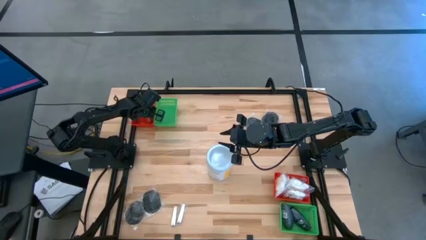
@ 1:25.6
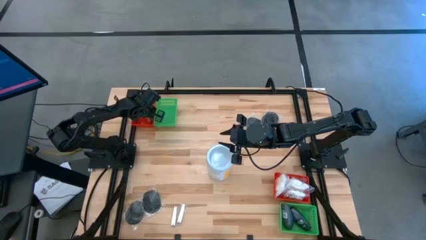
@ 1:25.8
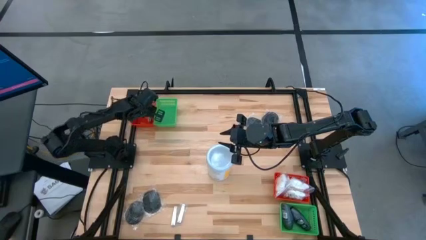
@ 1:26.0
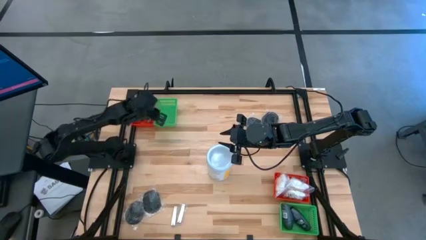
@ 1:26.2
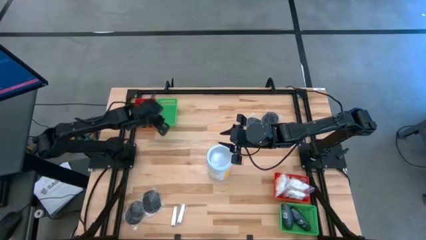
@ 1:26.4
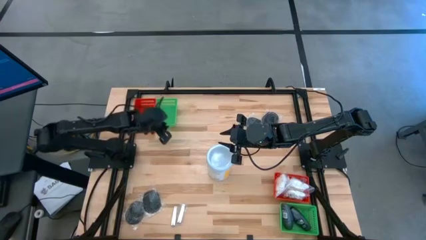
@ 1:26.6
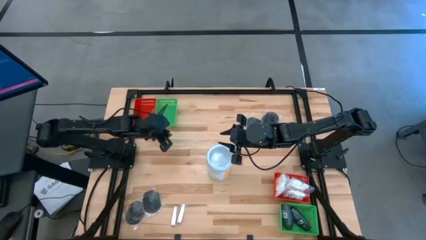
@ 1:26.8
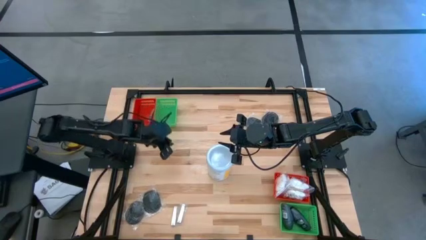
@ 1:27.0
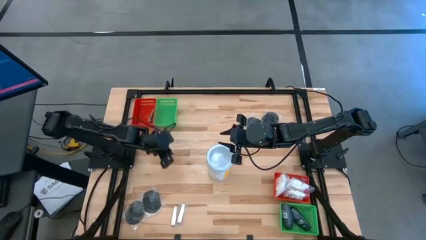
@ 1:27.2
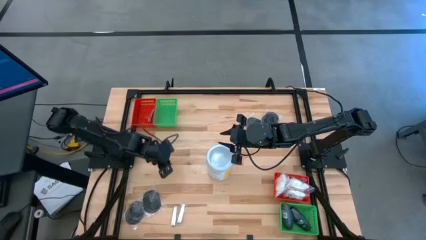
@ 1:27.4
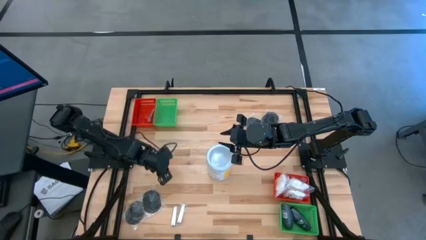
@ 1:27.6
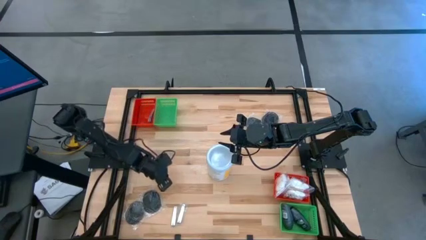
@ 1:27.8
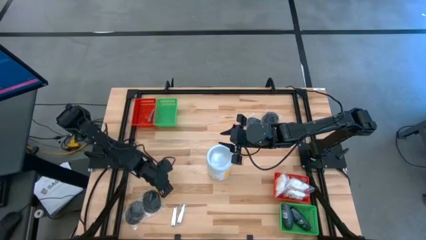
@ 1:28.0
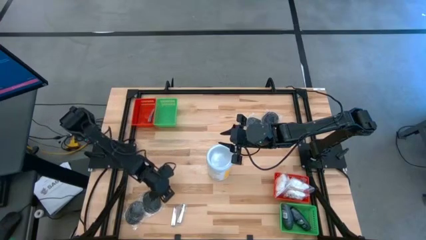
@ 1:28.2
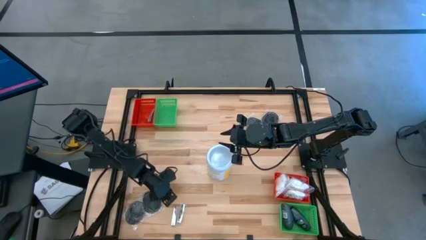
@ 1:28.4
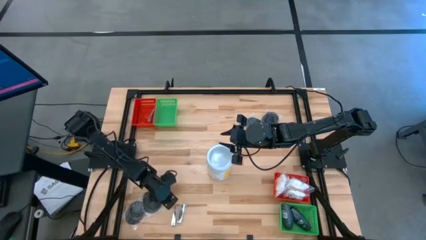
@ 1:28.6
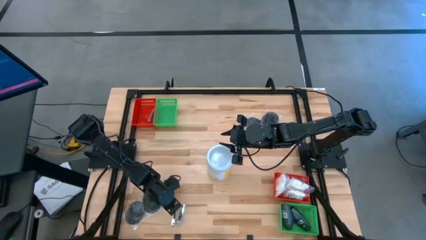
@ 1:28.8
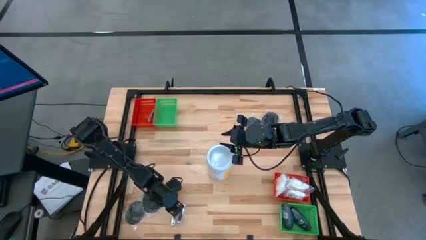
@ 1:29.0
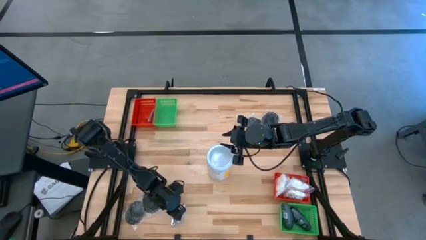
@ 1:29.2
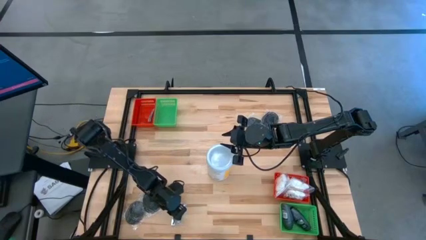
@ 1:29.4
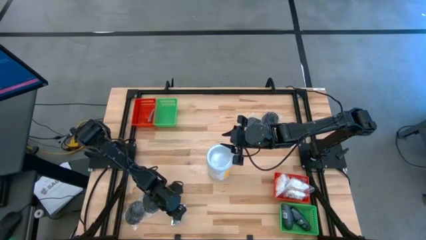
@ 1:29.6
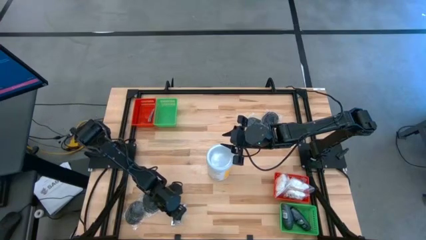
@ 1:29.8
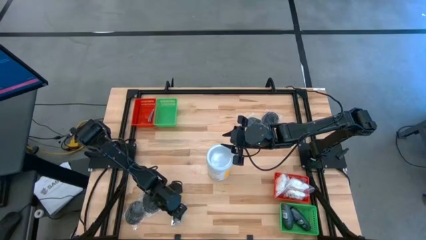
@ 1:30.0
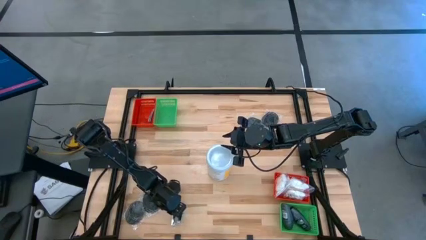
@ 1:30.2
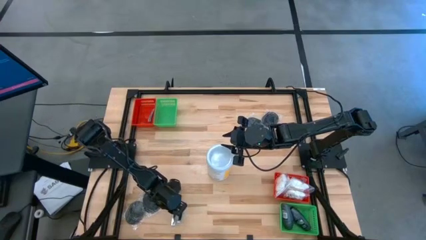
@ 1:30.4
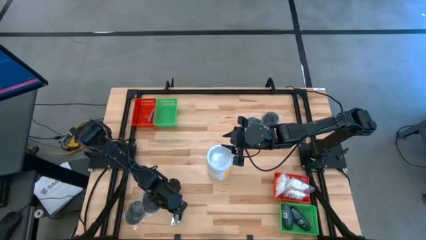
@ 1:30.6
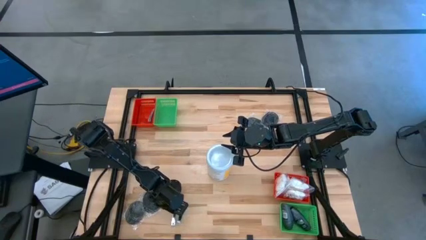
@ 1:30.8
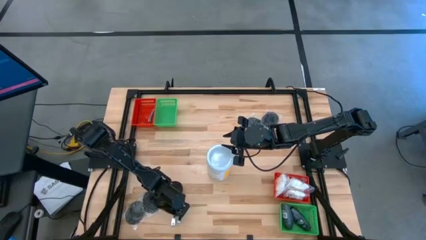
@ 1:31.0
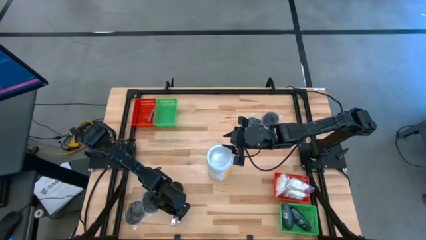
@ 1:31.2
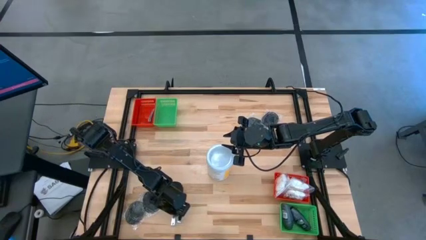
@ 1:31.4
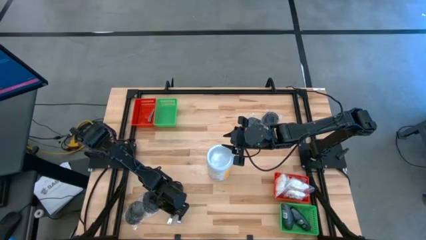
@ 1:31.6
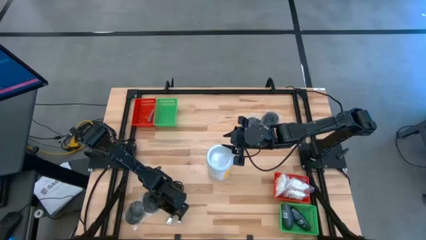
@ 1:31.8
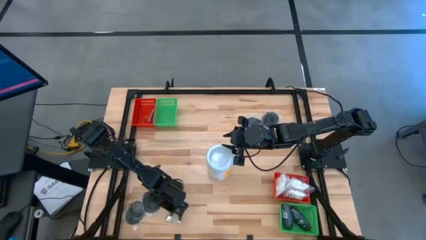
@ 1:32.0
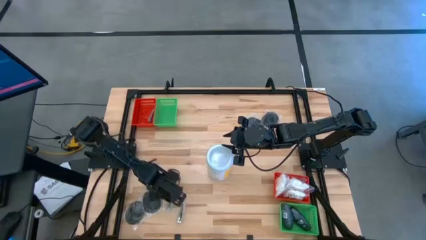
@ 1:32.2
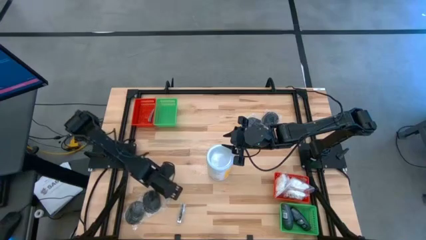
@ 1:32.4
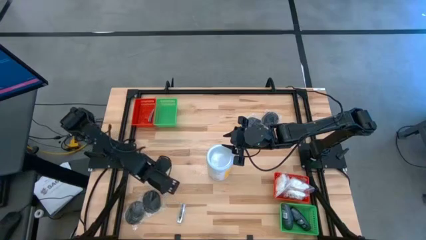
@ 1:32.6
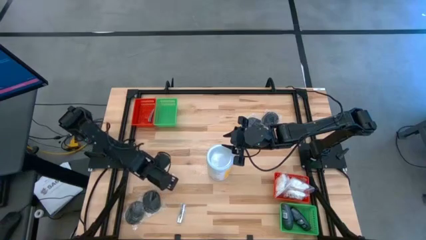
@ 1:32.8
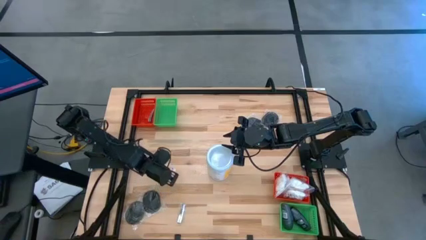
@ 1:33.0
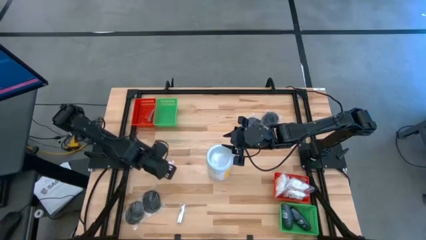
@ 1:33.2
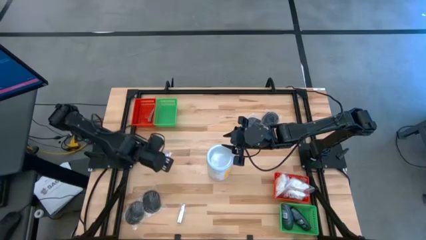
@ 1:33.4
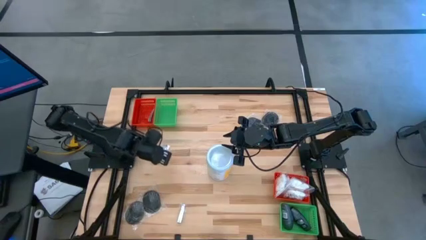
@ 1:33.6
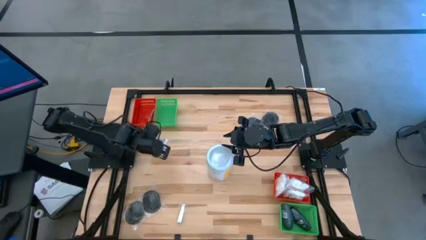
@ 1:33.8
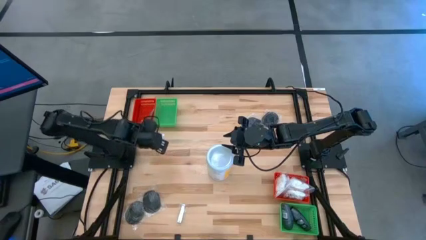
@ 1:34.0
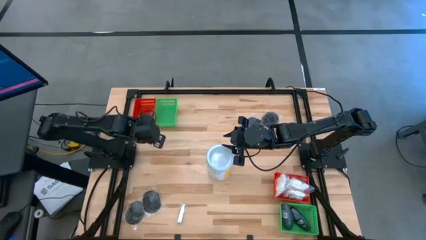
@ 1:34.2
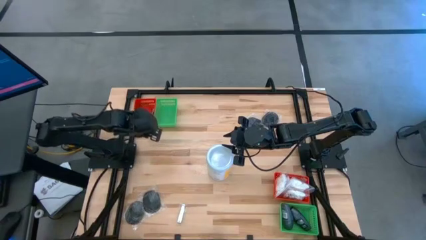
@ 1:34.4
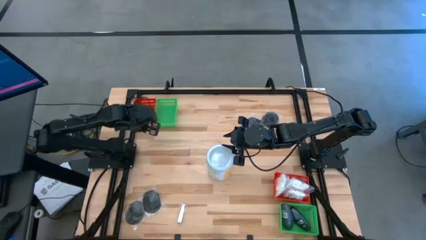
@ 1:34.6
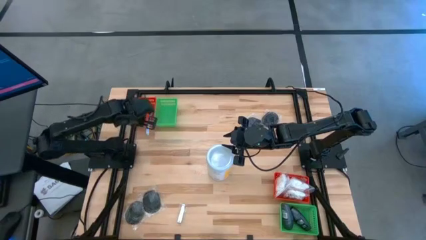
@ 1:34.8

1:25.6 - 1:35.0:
Task: Pick & Place Travel size toiletries
Put the silver nail clipper into the top red basket

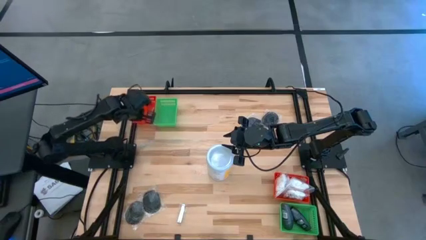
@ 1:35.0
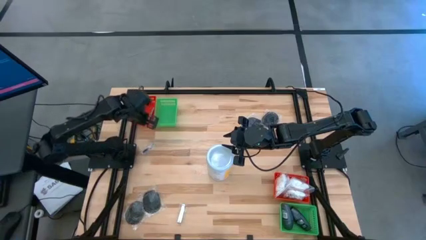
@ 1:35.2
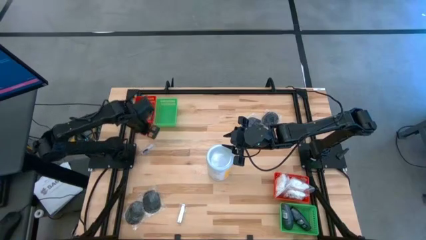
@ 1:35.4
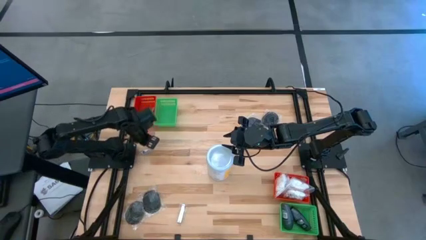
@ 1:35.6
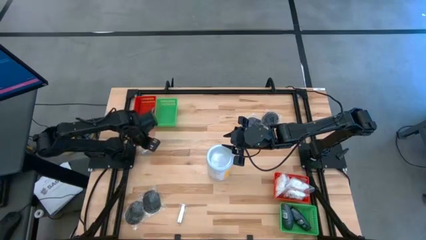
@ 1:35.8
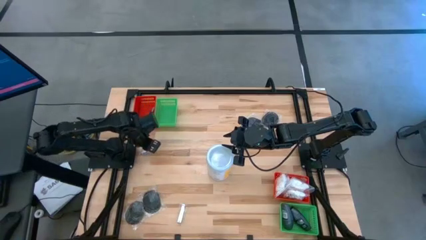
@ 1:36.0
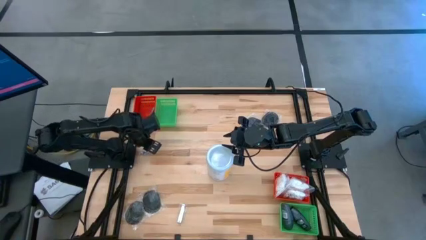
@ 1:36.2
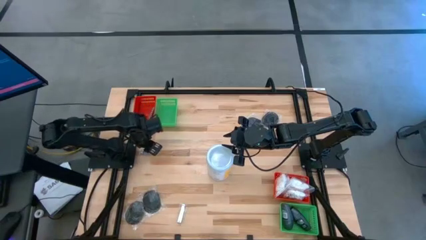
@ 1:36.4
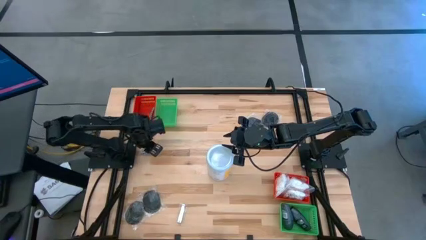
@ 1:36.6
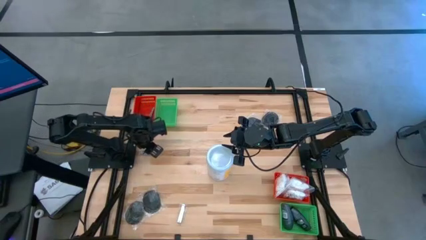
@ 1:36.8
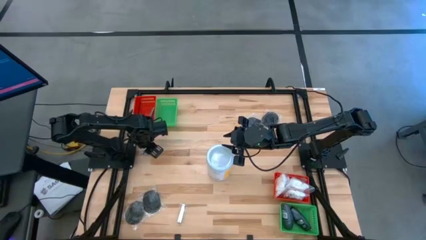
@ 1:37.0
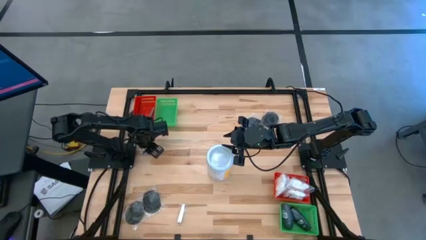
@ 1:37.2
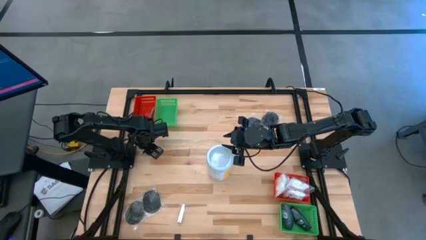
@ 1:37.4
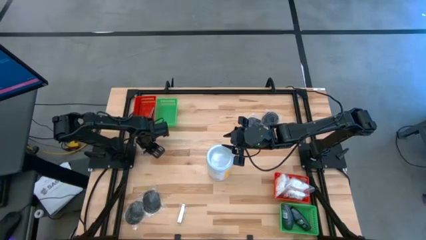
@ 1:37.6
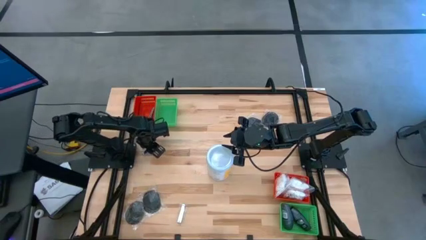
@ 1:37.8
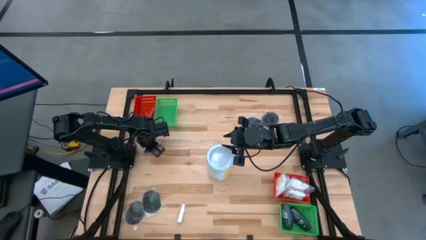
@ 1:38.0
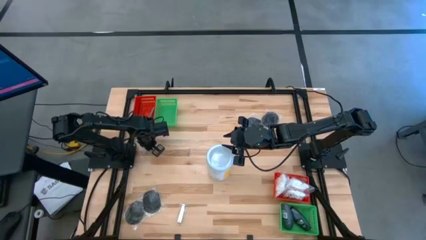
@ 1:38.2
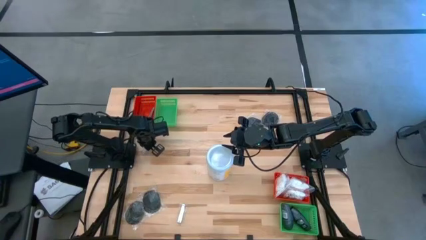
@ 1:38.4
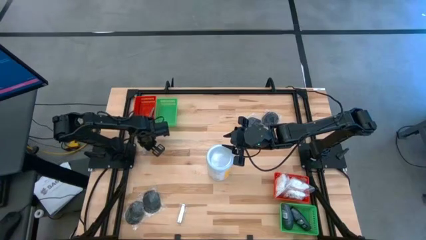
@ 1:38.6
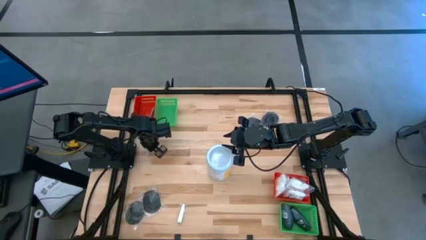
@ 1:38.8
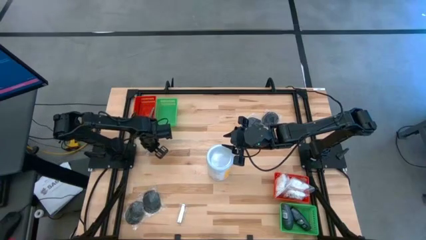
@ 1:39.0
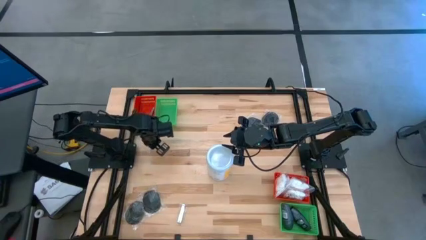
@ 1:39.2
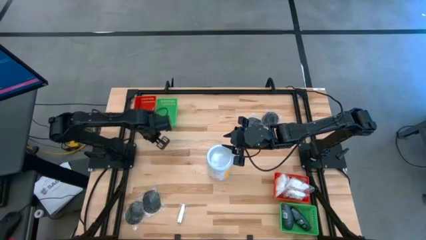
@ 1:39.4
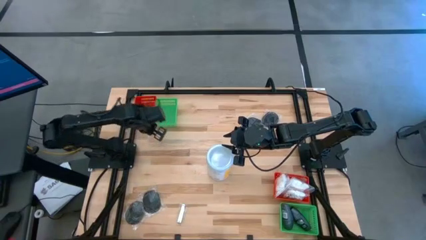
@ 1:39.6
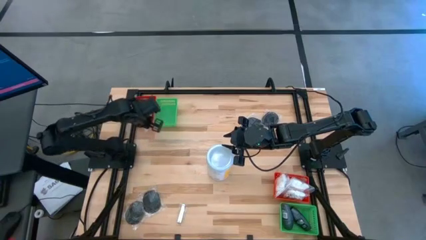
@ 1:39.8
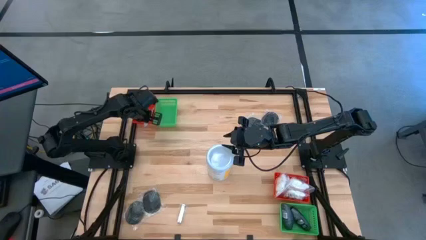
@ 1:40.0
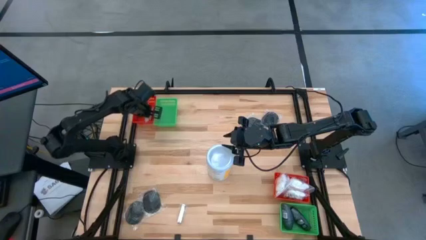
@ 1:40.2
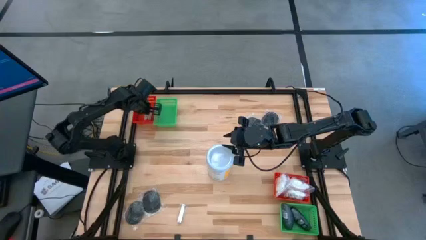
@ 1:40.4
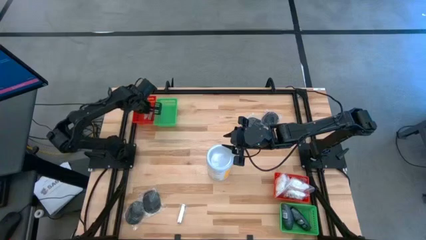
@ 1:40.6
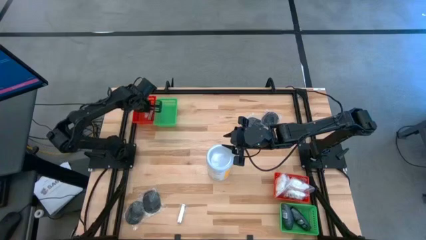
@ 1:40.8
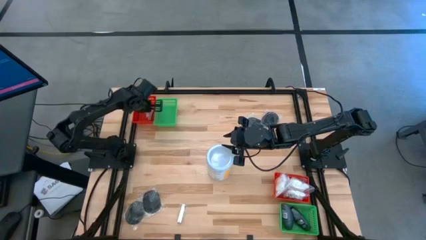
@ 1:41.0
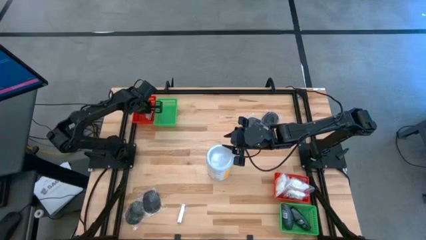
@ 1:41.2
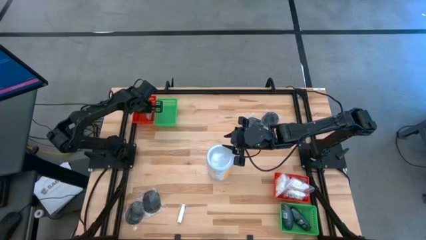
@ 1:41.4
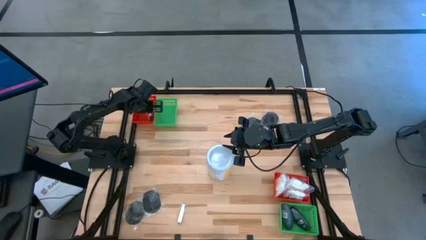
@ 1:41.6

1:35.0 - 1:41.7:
Put the silver nail clipper into the top red basket
